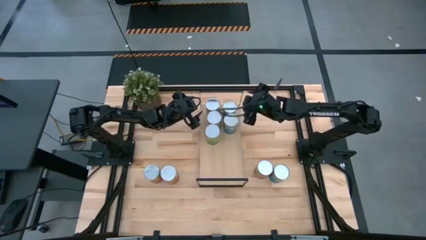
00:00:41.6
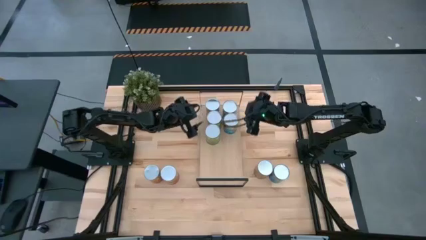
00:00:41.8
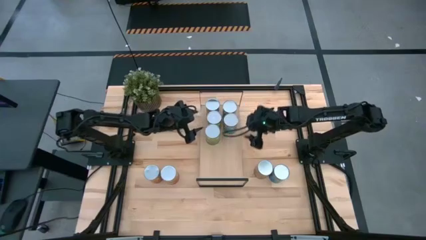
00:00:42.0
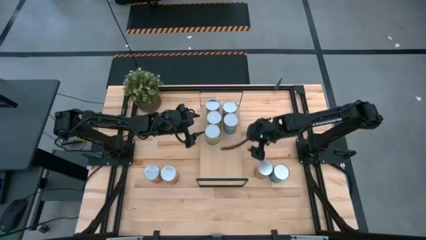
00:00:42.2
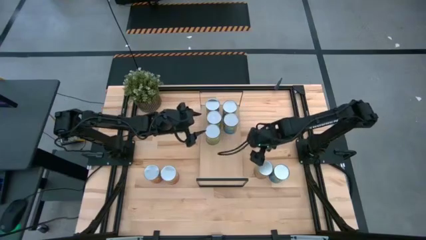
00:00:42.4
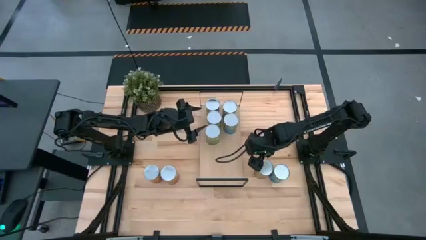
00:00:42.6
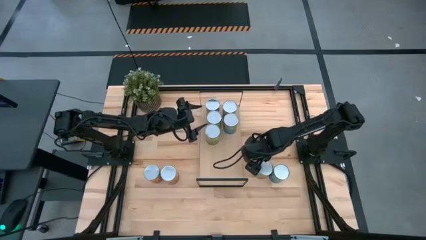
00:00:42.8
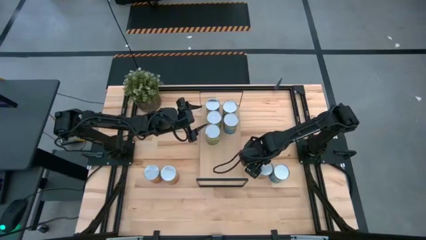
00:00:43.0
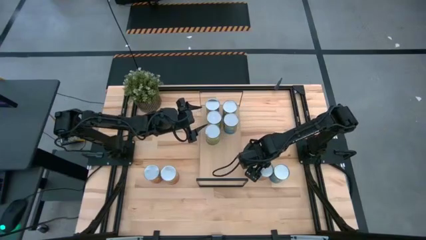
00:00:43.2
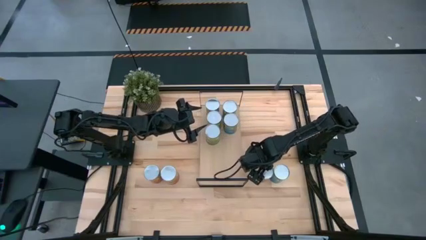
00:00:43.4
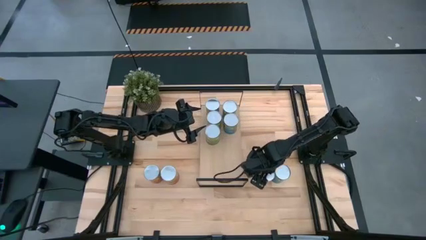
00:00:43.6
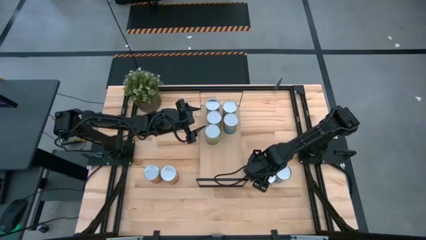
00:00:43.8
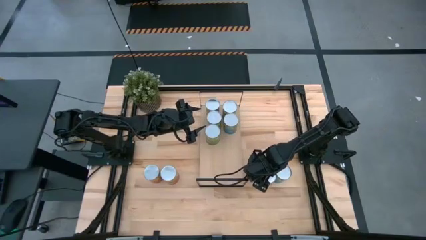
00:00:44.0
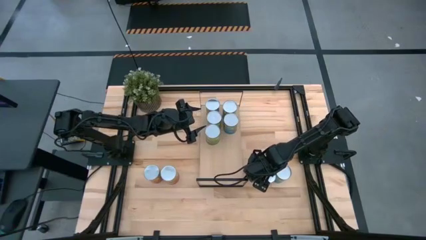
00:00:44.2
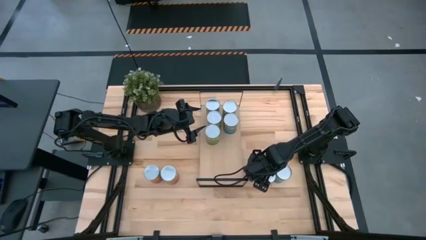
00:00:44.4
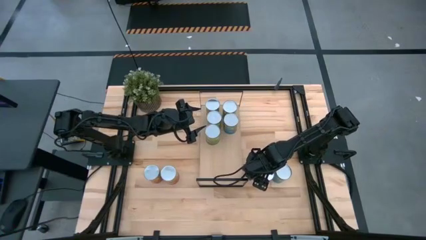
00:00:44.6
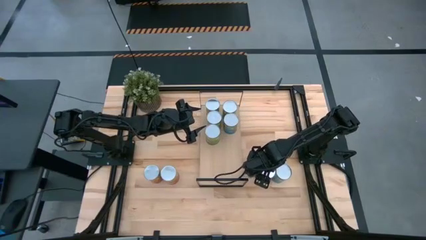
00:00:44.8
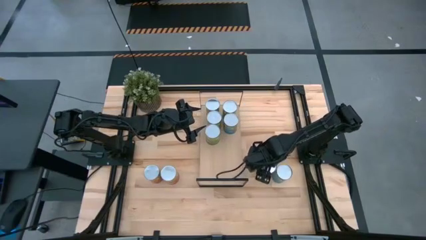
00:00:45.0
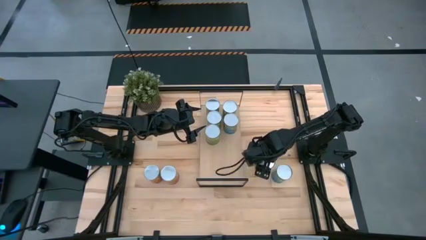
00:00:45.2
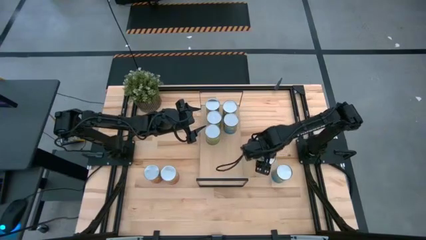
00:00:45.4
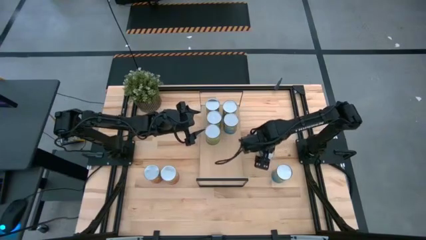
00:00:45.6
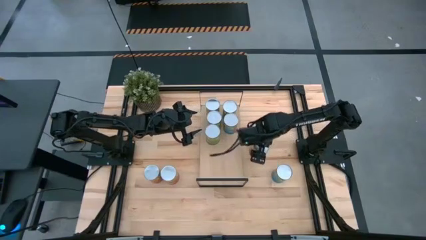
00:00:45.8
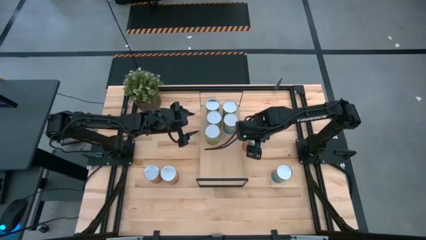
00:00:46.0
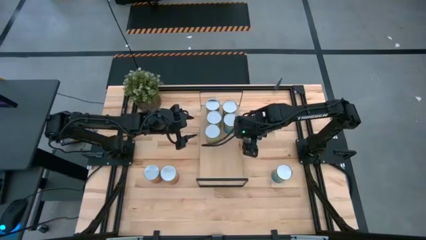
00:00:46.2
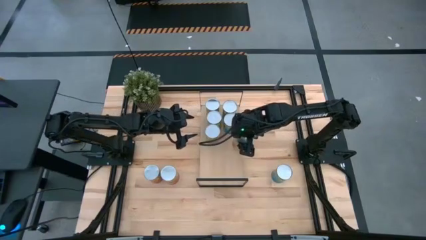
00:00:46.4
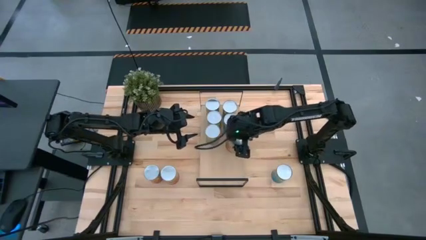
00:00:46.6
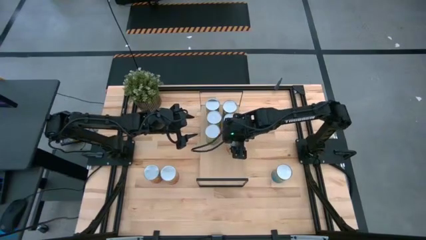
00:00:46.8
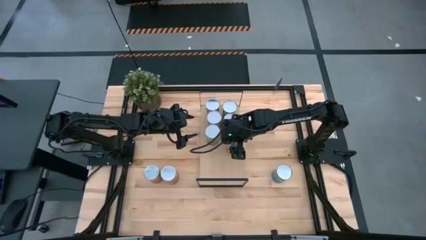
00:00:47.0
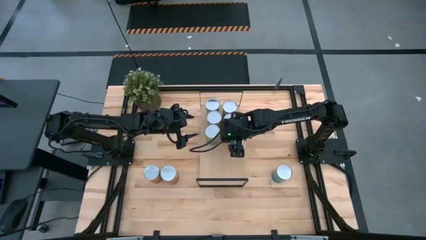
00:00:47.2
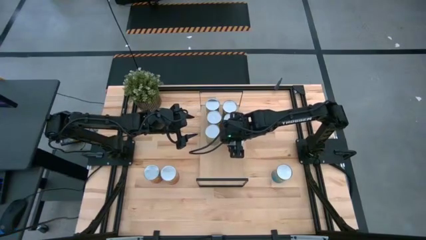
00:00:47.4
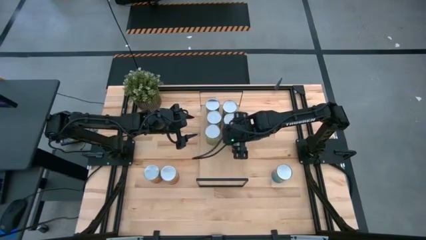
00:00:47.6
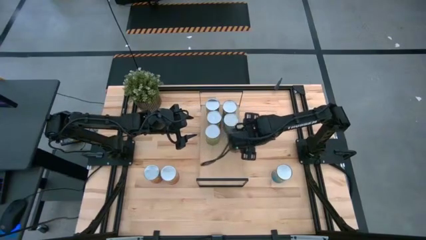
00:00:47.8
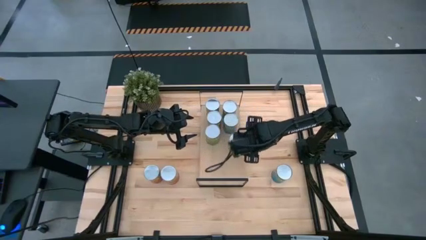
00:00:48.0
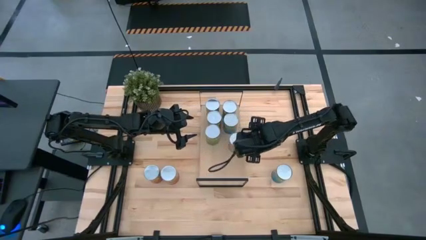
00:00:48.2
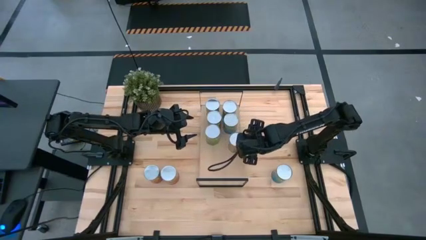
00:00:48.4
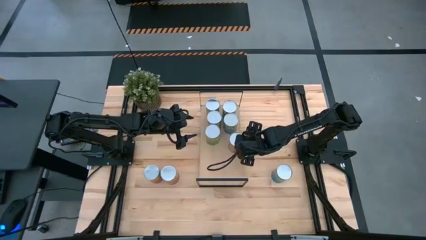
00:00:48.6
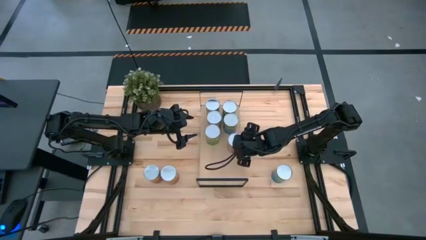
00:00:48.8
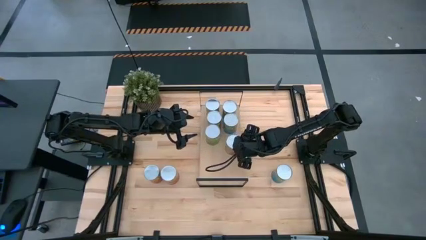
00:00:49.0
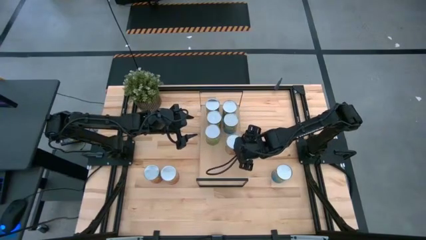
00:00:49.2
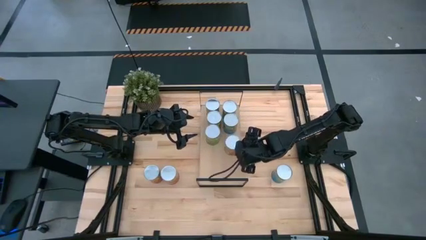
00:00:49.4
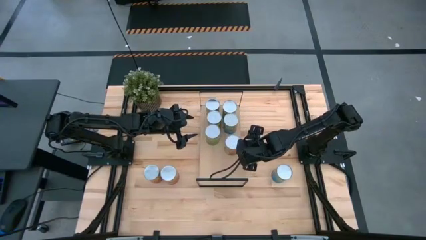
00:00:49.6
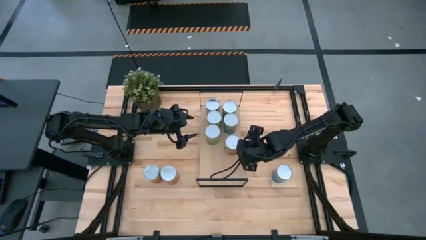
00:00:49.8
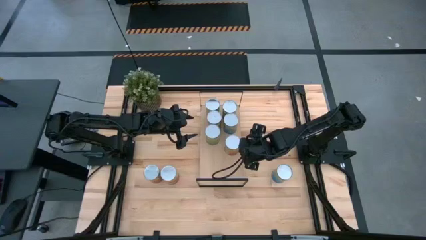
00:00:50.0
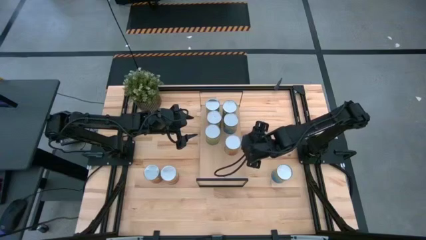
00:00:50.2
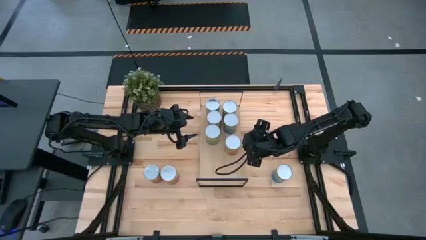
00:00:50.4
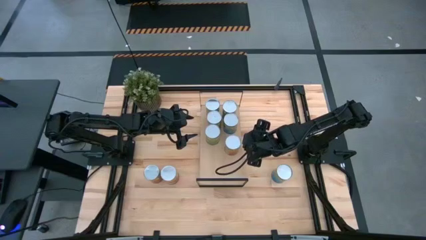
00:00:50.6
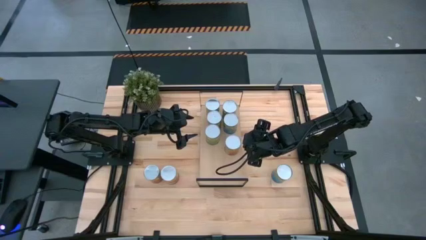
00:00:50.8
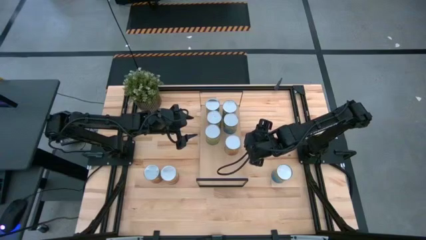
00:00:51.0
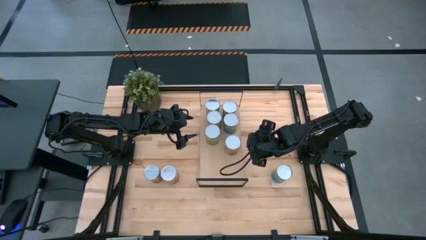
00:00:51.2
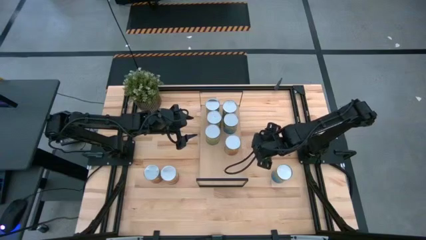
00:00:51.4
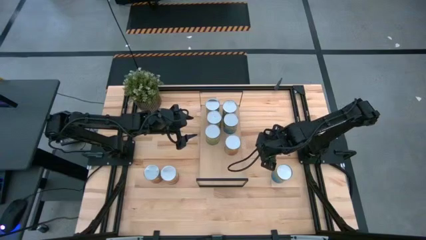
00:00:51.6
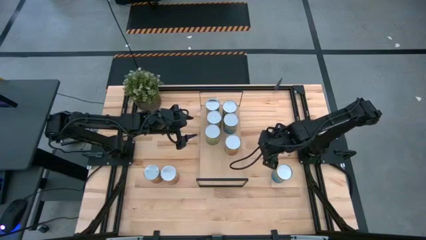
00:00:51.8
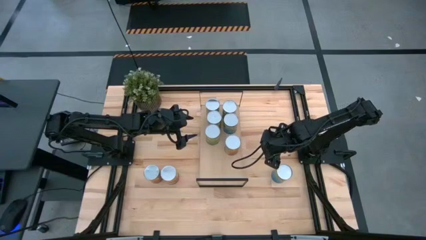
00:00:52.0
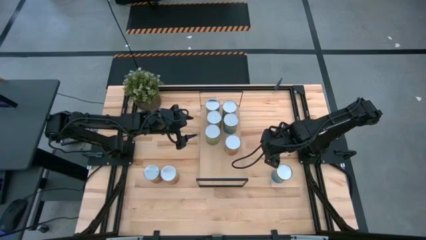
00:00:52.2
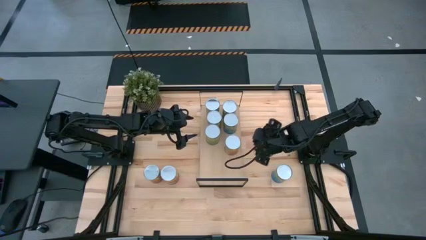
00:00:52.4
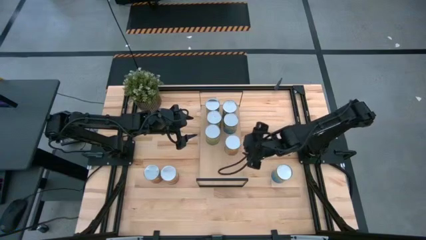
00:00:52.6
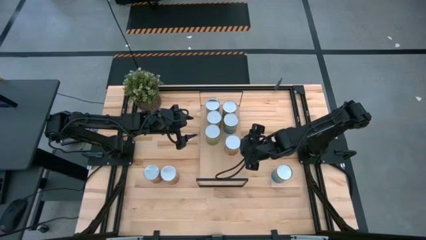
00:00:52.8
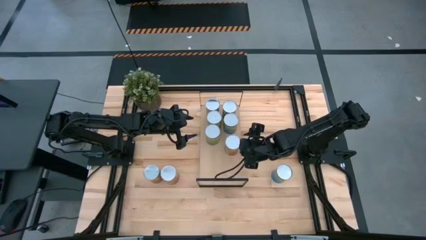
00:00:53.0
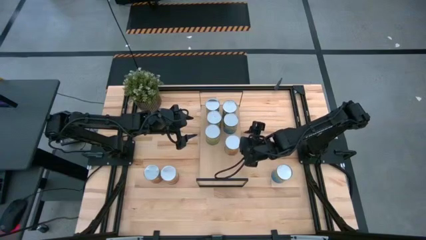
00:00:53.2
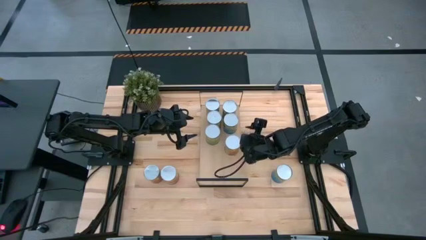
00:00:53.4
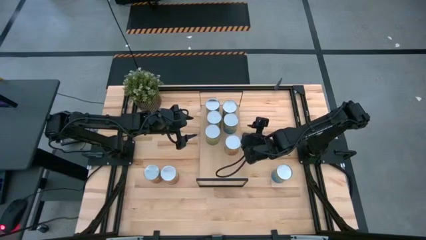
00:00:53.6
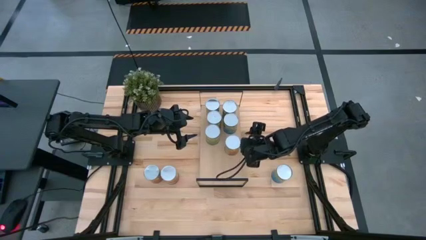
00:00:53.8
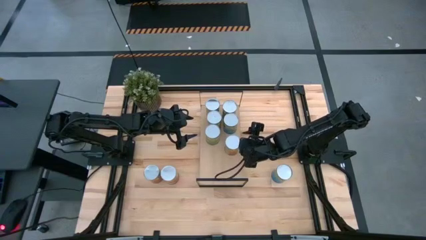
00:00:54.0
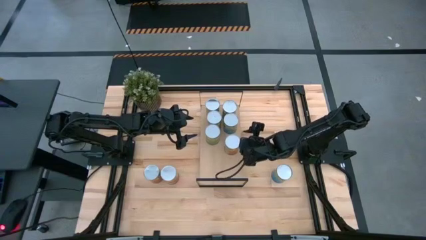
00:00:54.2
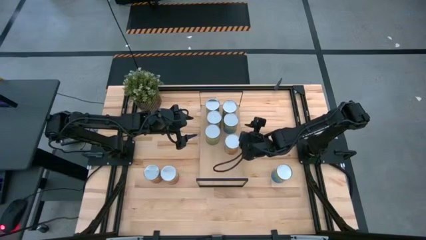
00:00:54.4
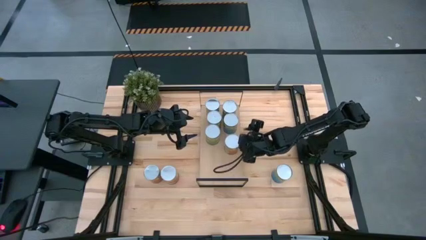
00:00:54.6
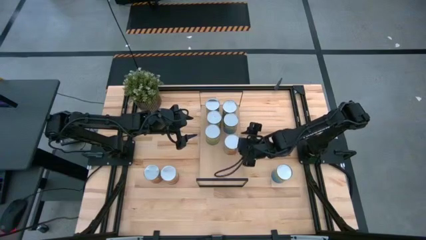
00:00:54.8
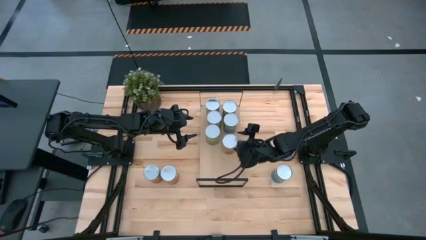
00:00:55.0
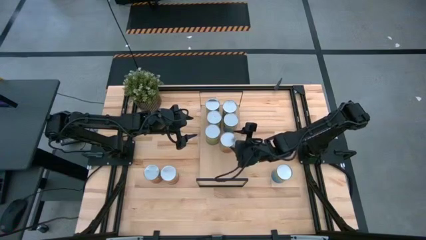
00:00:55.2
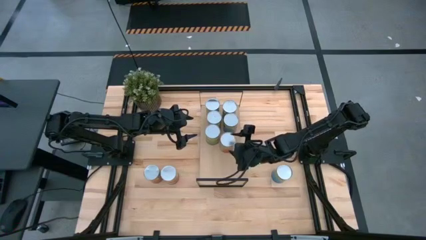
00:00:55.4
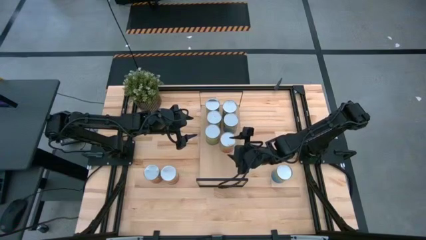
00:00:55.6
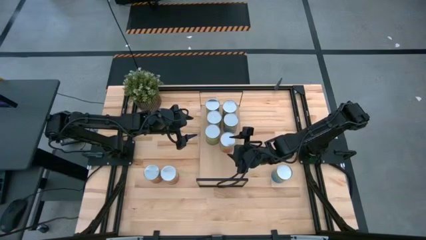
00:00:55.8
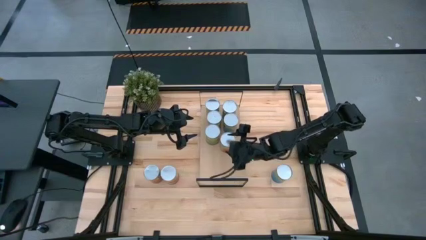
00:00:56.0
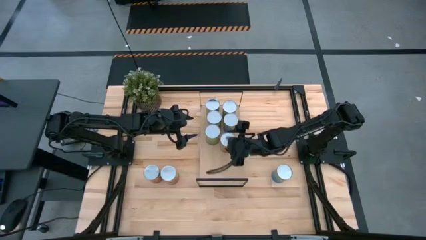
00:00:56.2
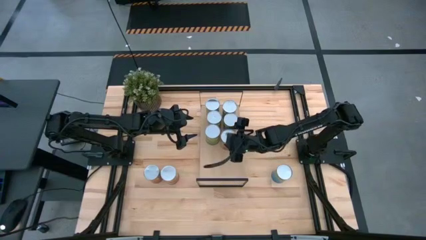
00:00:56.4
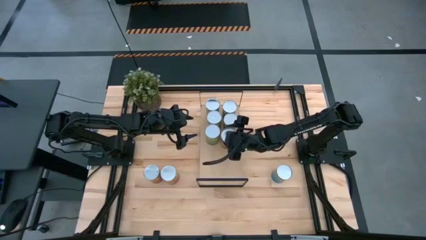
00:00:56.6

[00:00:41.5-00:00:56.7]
Task: Pick and place cans onto a shelf
Put the right canned pineapple on the shelf

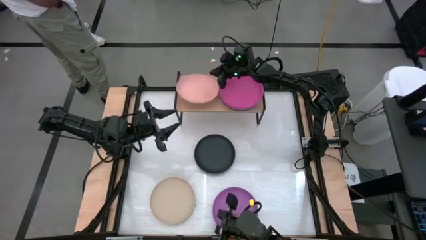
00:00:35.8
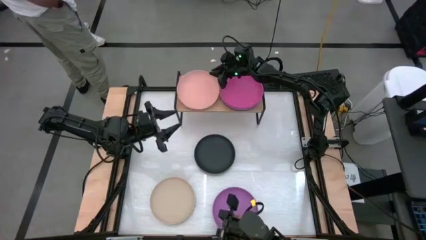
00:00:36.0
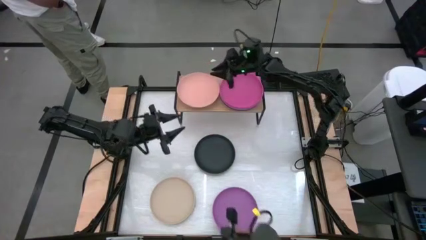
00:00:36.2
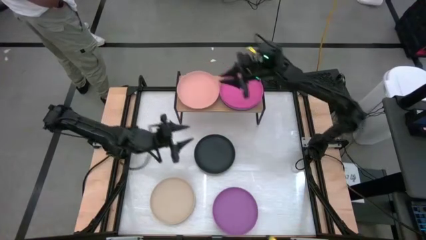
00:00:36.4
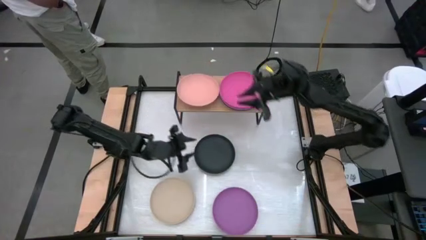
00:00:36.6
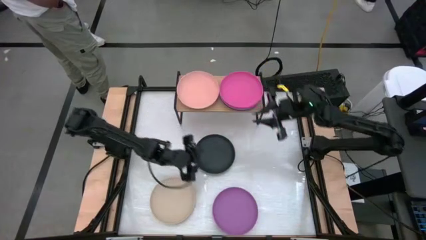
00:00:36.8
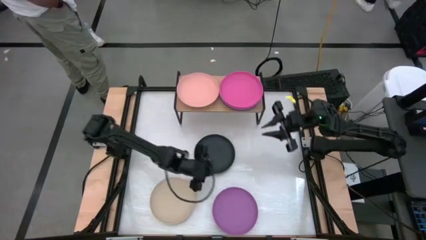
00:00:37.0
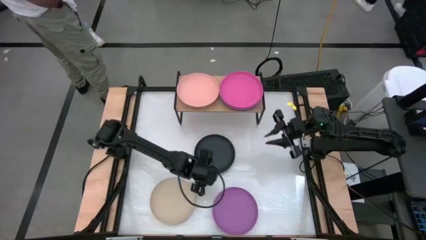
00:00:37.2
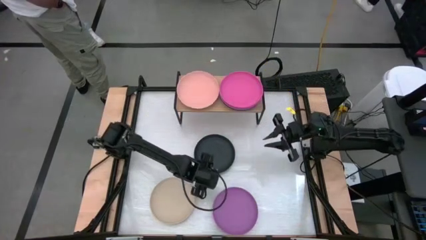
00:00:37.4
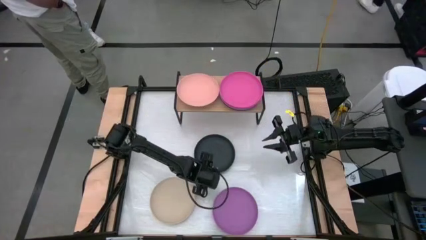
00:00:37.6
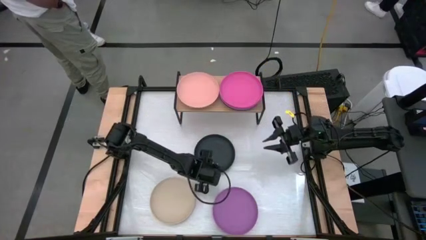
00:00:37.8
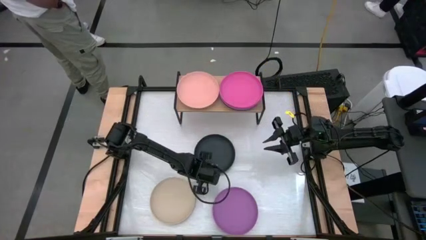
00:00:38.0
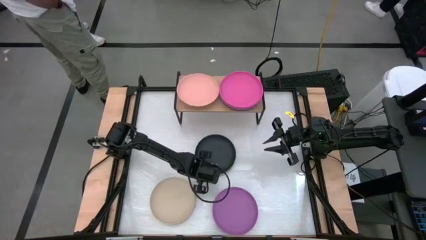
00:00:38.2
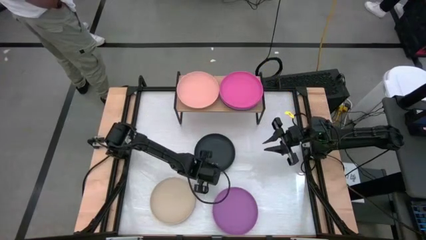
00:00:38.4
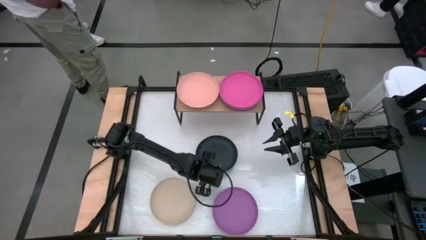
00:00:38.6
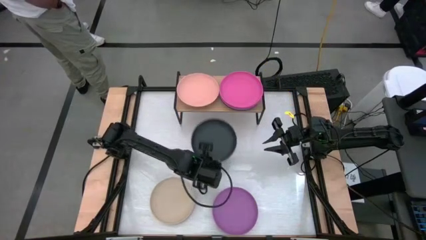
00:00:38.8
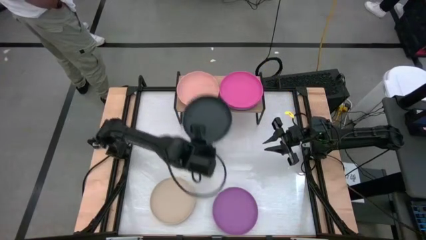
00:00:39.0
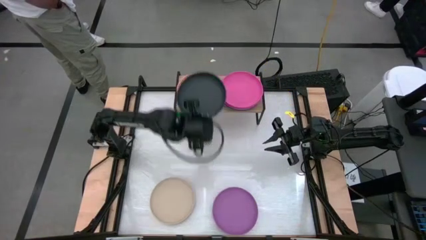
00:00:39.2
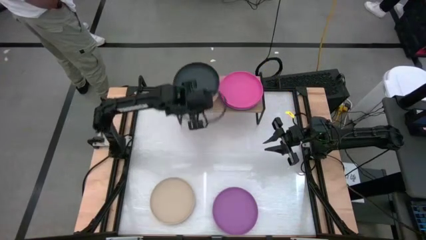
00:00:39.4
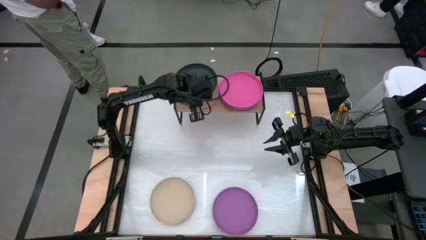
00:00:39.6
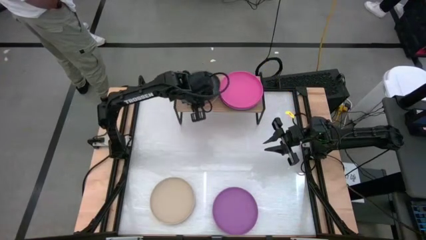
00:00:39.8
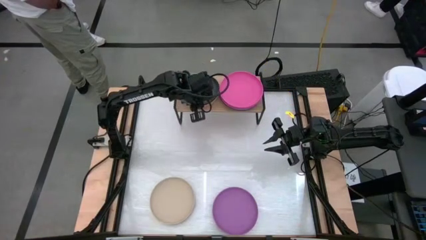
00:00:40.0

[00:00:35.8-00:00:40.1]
Task: Place and stack plates onto a shelf
Stack the black plate on top of the light orange plate on the shelf
